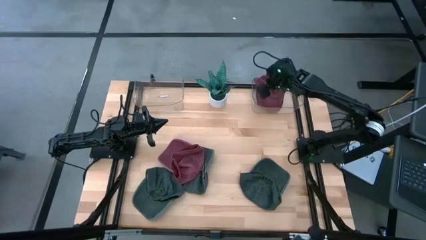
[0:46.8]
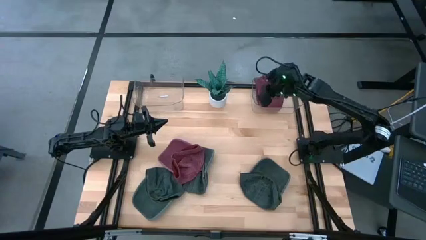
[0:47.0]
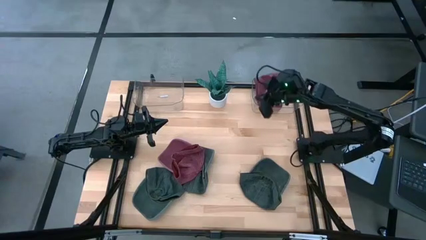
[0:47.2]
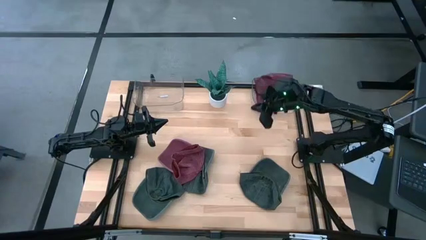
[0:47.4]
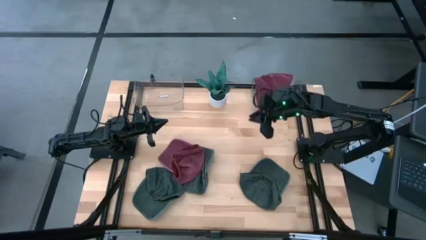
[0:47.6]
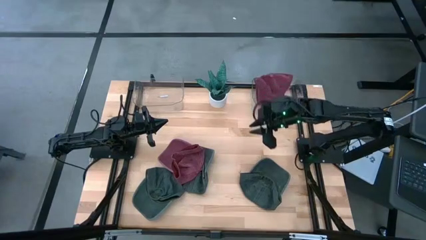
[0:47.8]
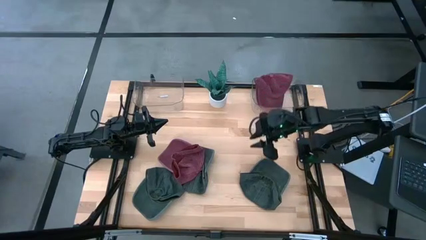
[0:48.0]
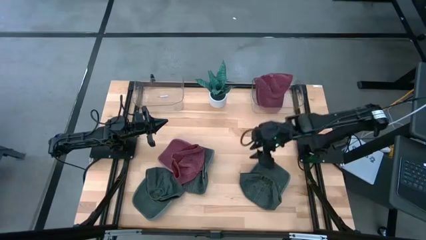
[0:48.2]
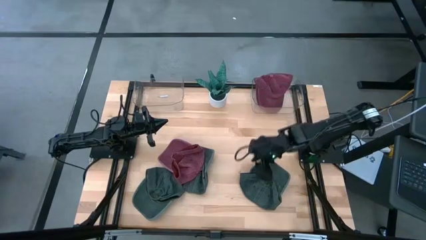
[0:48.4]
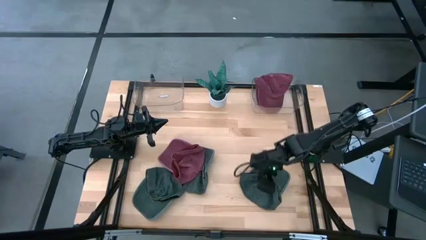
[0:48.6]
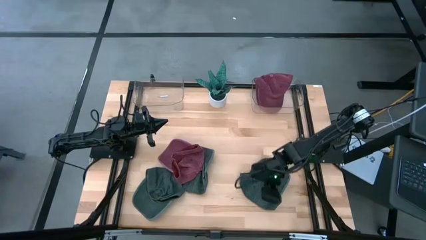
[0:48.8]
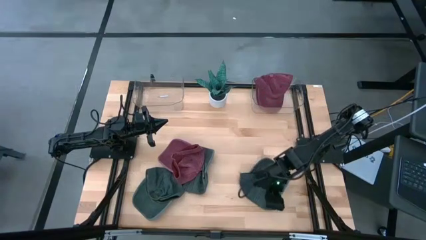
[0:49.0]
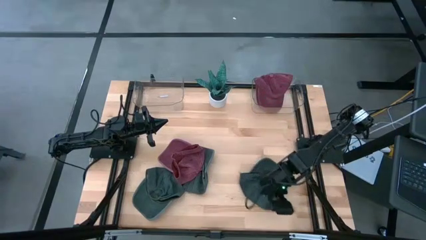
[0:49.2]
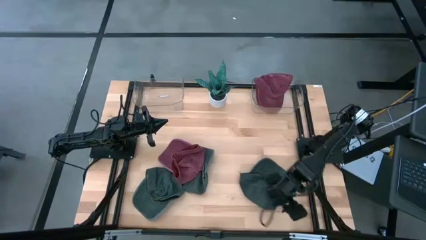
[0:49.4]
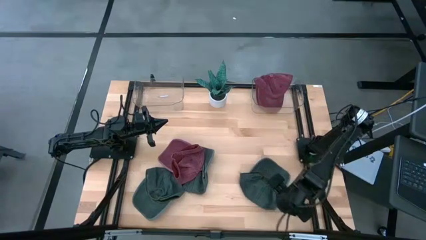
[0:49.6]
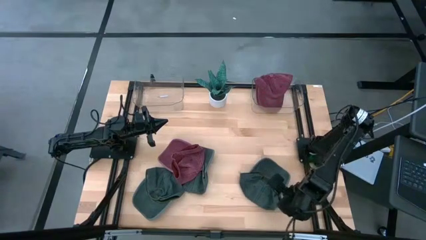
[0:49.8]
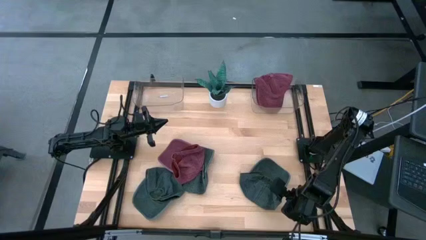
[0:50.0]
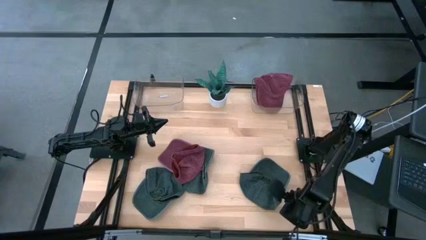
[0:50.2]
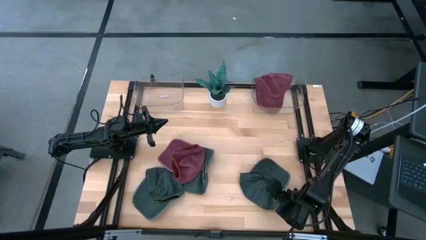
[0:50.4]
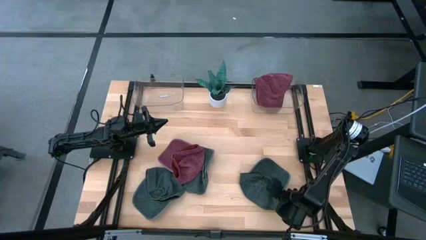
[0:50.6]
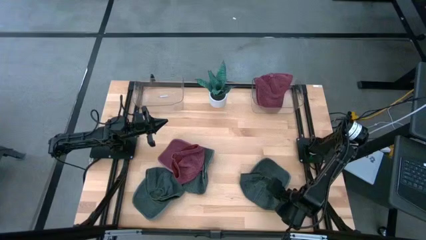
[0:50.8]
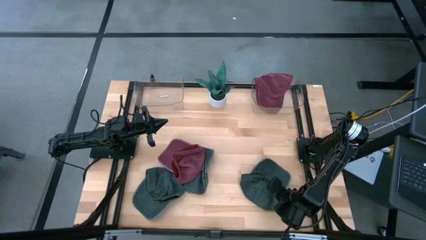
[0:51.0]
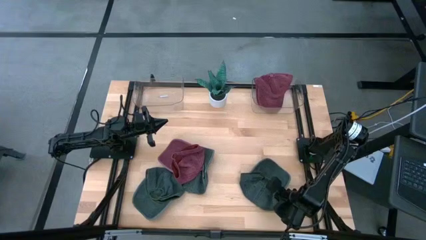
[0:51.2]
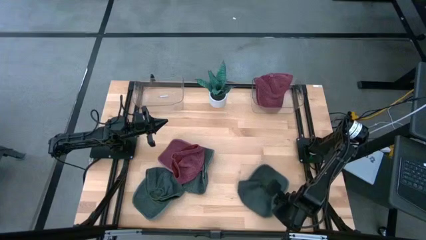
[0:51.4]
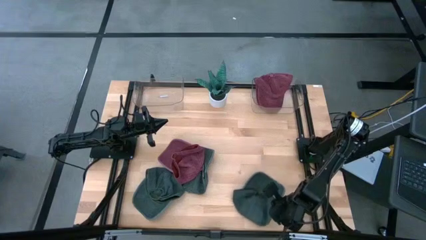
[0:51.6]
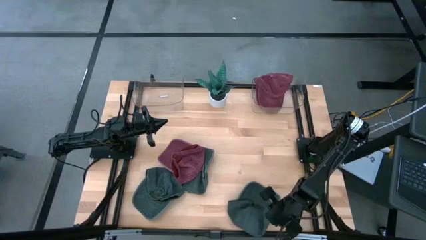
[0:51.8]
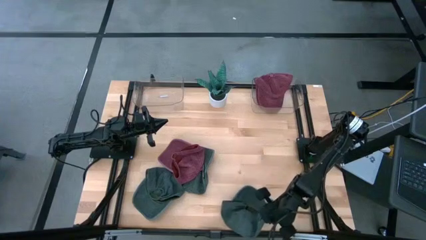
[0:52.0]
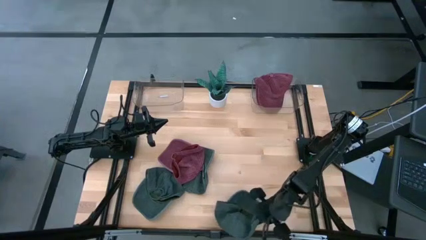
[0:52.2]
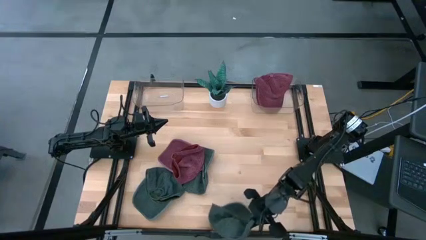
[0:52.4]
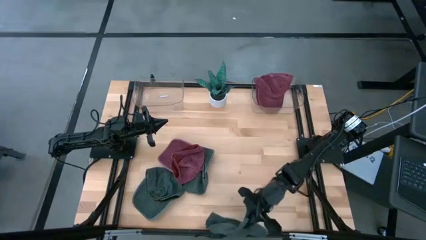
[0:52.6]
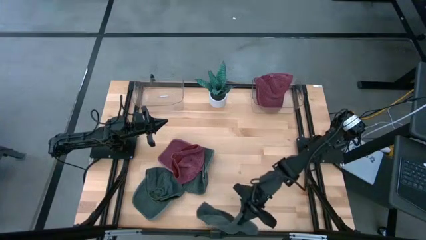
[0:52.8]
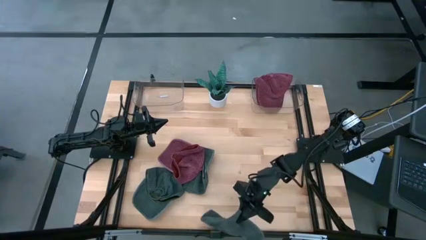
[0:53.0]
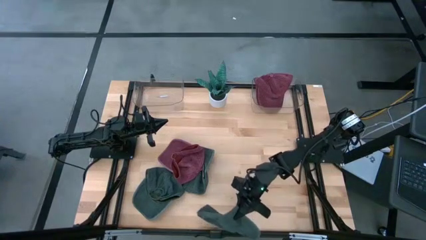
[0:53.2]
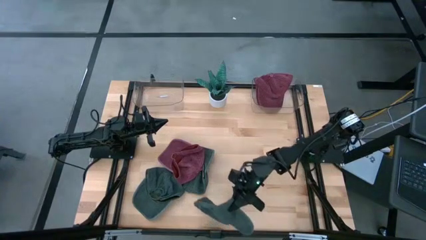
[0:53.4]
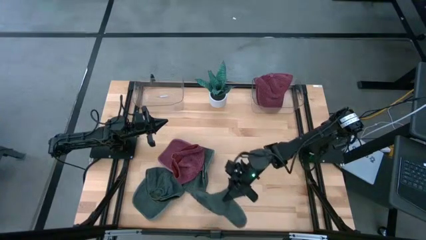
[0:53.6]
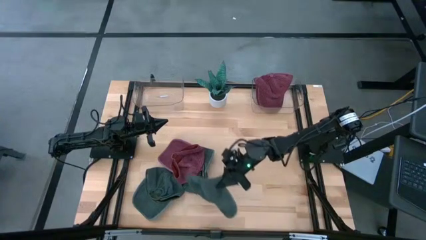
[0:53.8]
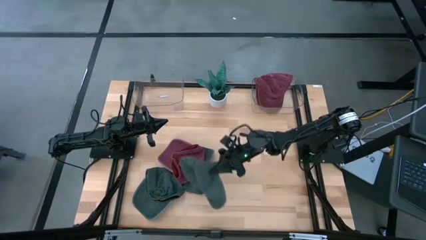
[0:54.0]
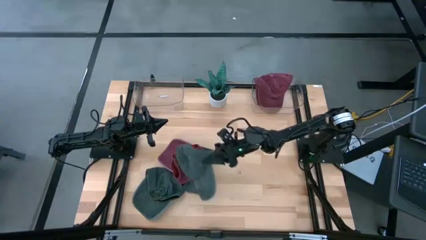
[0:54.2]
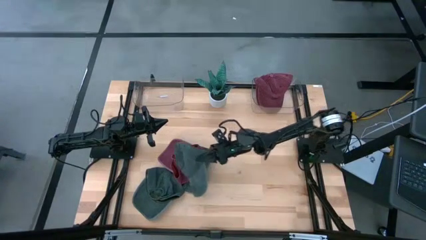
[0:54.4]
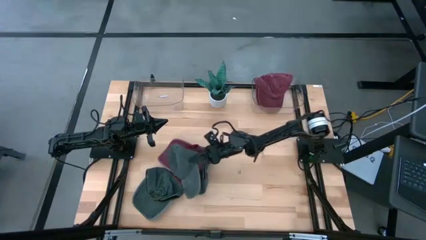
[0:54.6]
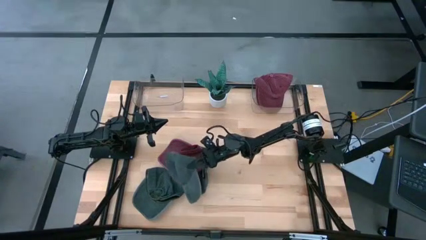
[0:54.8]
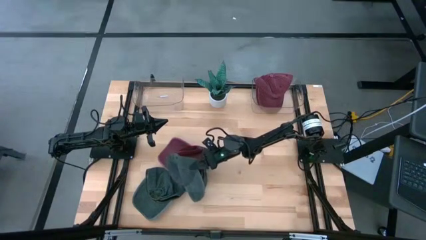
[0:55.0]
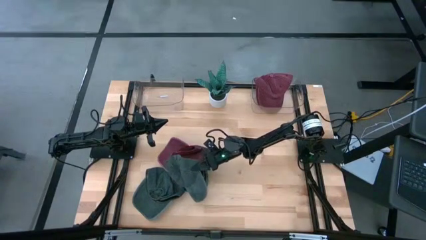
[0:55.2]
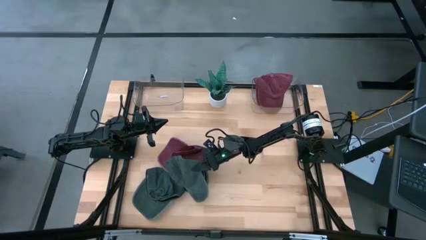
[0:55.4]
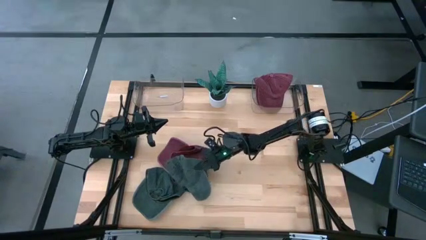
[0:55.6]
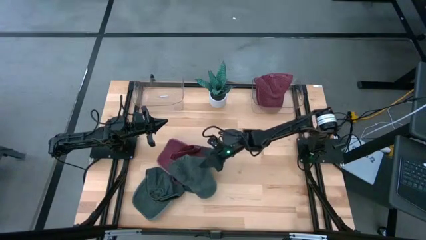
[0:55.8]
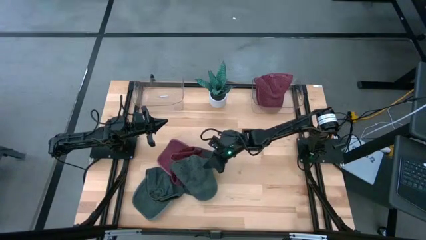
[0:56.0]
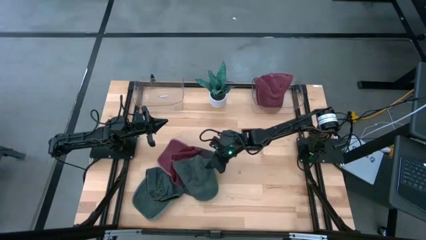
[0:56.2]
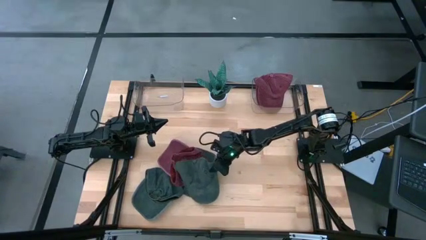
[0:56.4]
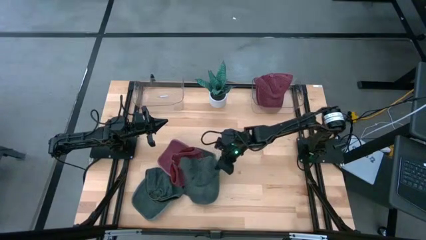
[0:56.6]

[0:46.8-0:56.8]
Task: Pick & Place hat
Move the right black cap into the center of the table

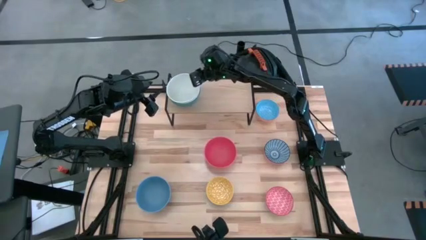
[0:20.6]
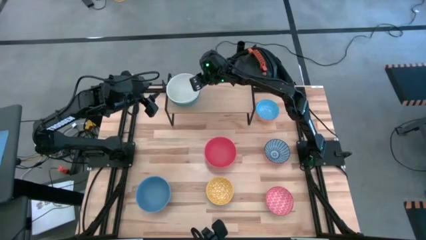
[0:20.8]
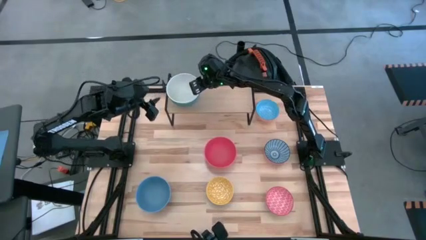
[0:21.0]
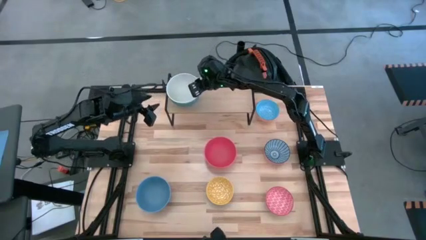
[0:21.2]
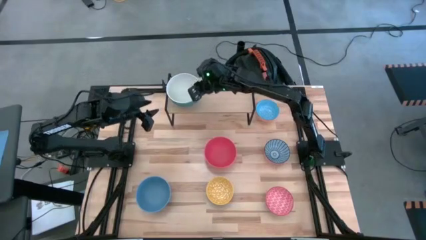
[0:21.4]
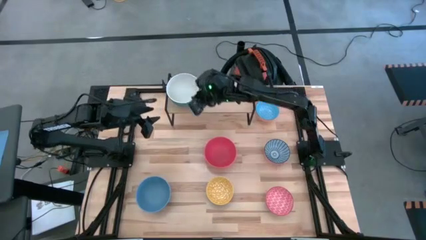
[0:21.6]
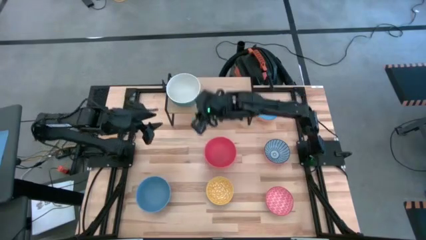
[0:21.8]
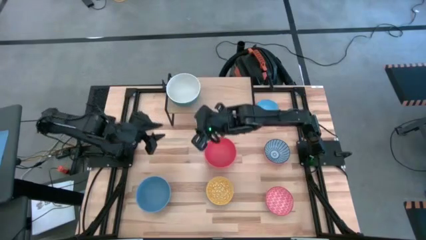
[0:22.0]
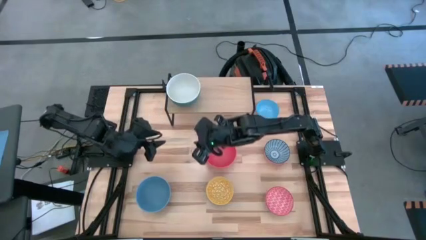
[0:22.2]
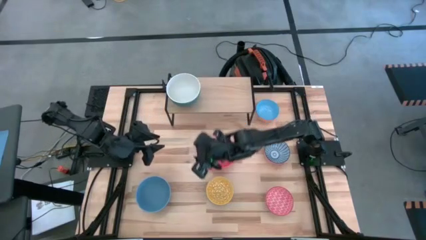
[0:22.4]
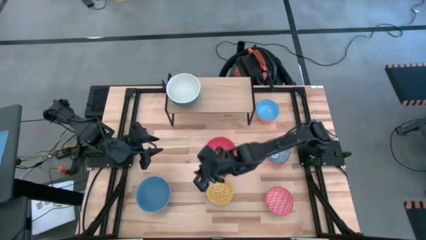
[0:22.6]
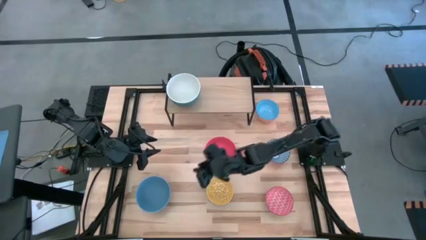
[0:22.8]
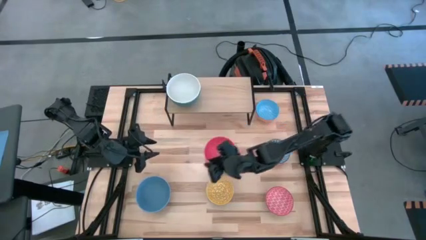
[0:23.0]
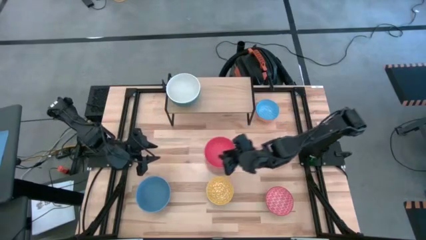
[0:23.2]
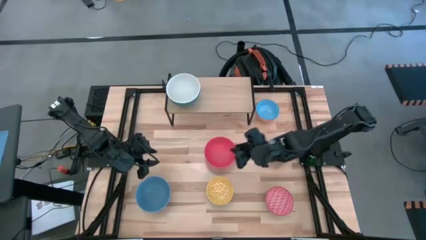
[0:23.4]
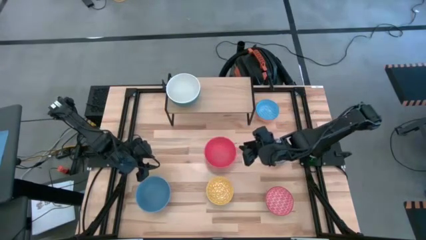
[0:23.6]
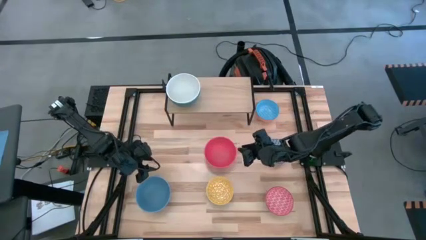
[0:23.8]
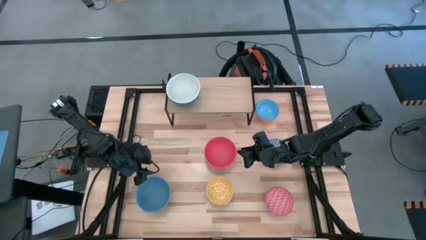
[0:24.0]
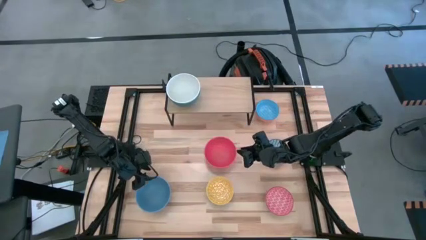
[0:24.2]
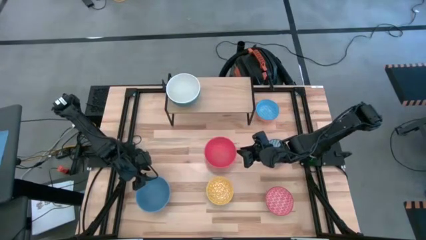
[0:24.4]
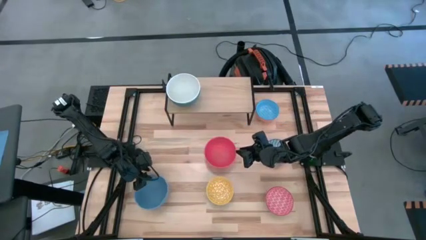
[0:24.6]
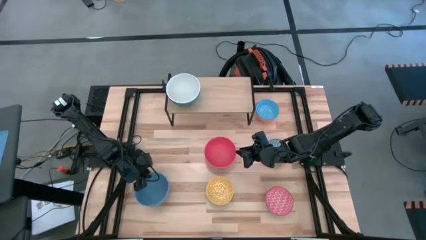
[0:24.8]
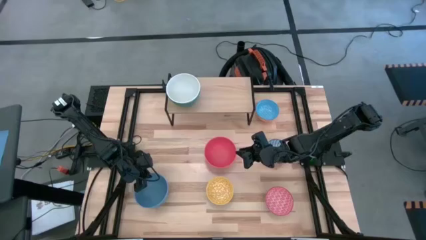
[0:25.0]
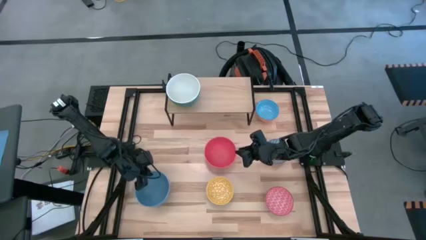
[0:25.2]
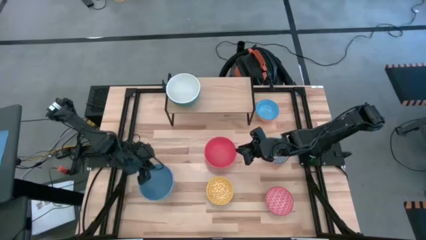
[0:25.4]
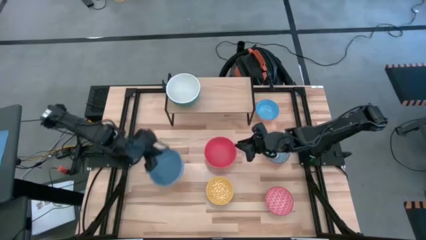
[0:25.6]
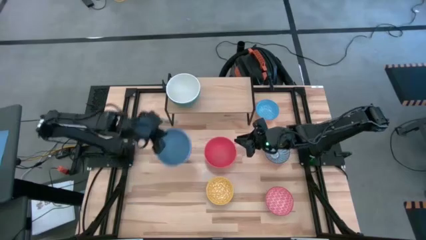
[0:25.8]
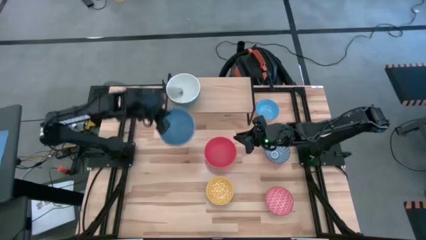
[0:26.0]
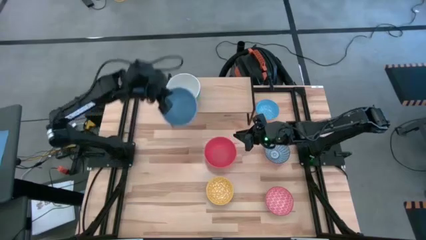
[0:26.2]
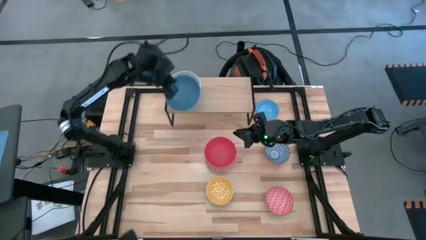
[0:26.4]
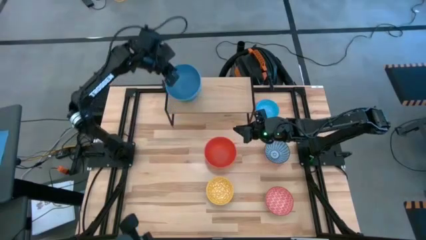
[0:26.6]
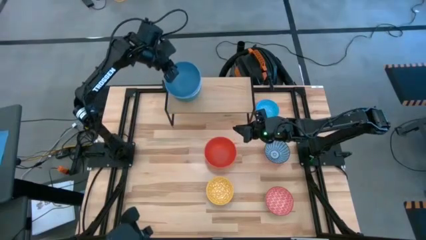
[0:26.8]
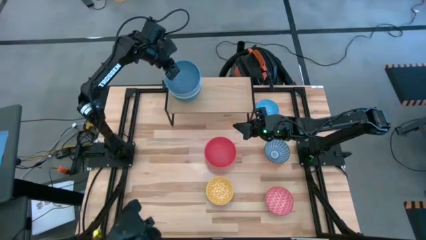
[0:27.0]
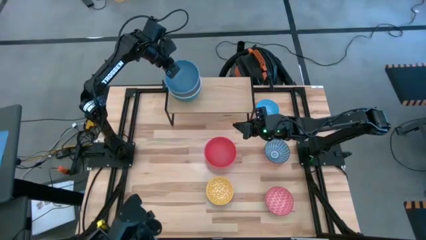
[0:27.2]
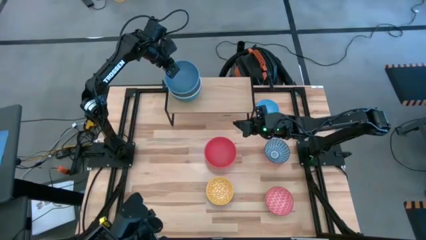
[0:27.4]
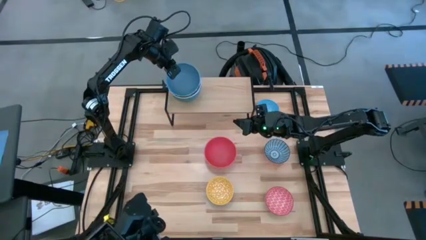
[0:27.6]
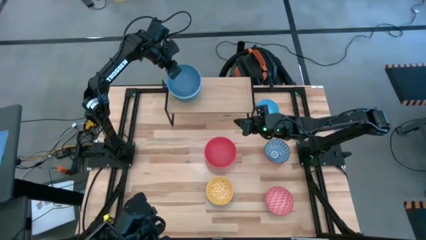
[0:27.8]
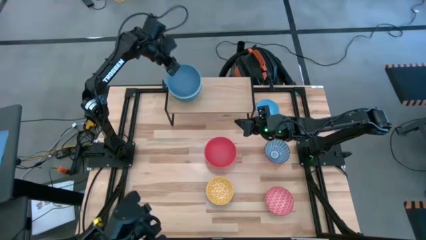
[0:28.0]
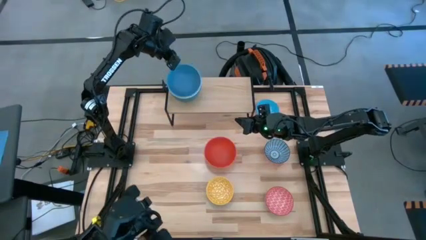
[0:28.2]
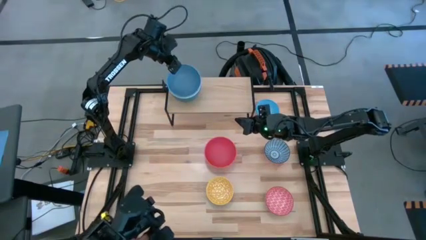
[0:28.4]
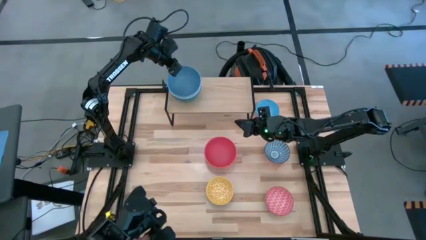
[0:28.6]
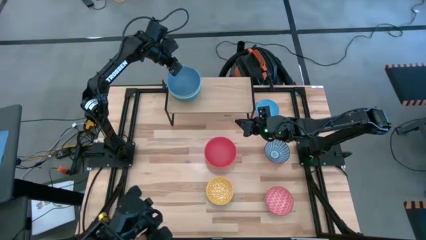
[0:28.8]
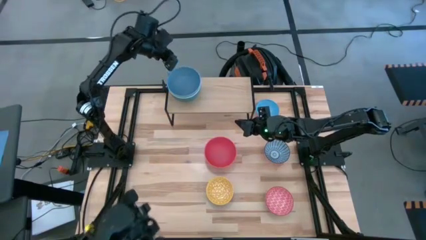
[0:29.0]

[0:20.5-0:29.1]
Task: Place and stack bowls onto a shelf
Stack the blue bowl into the white bowl
